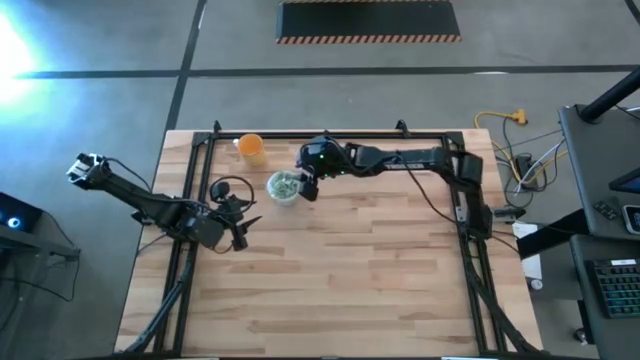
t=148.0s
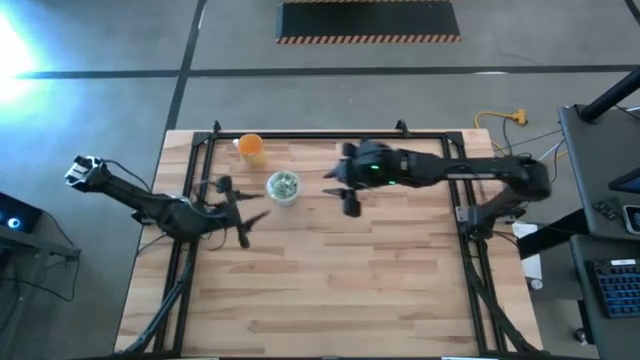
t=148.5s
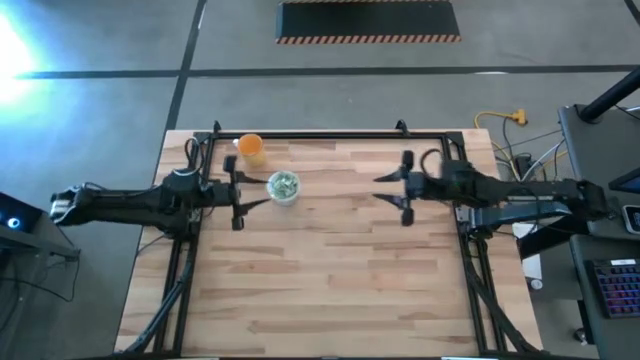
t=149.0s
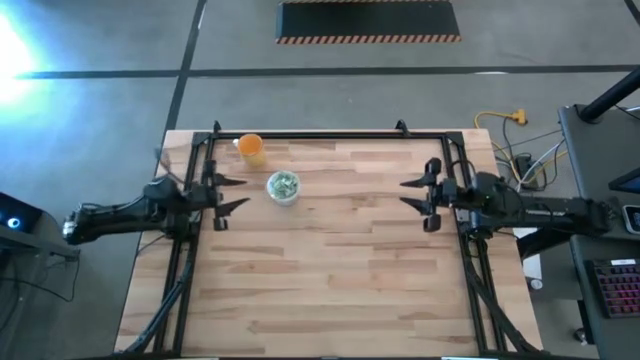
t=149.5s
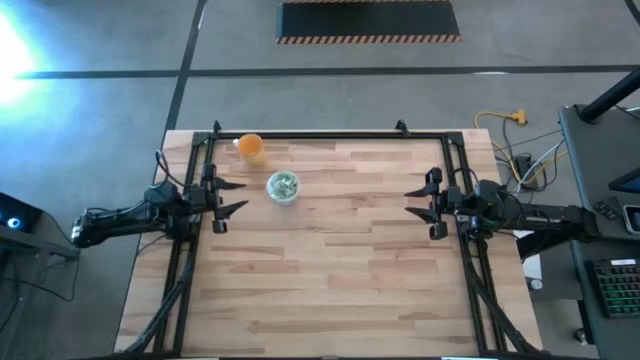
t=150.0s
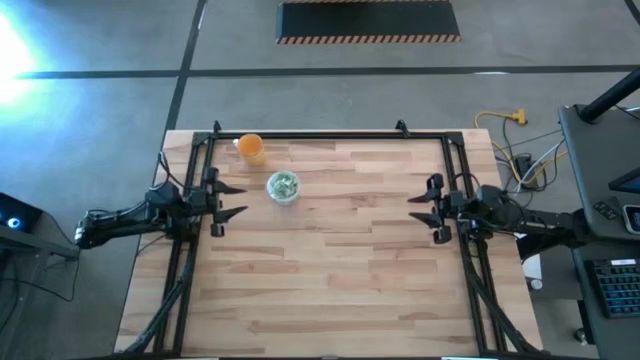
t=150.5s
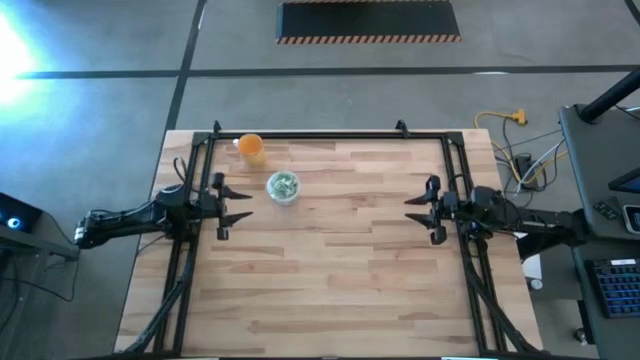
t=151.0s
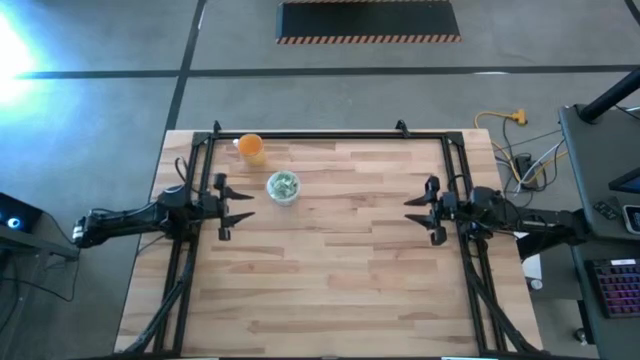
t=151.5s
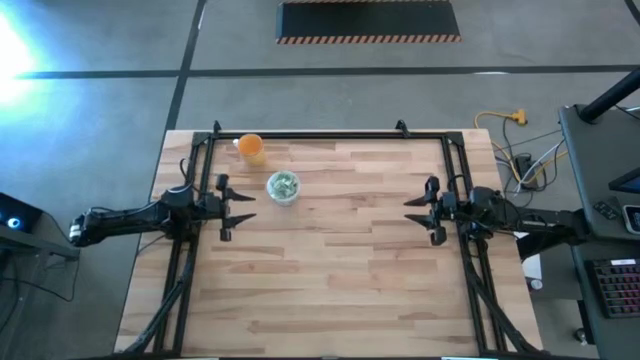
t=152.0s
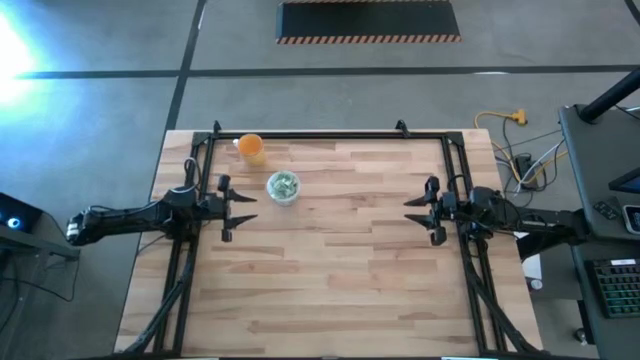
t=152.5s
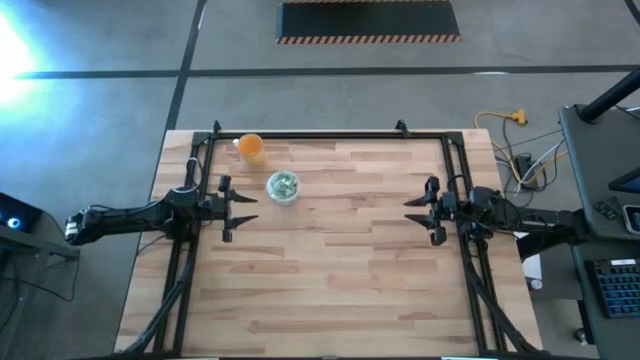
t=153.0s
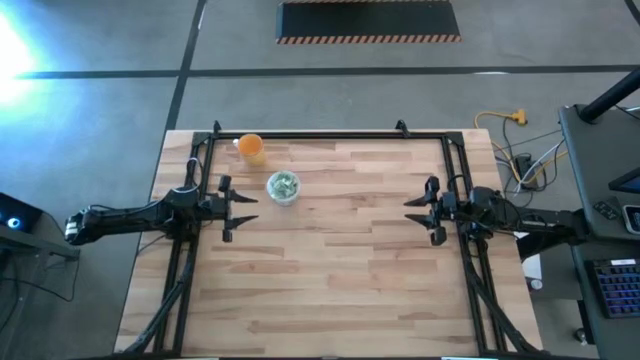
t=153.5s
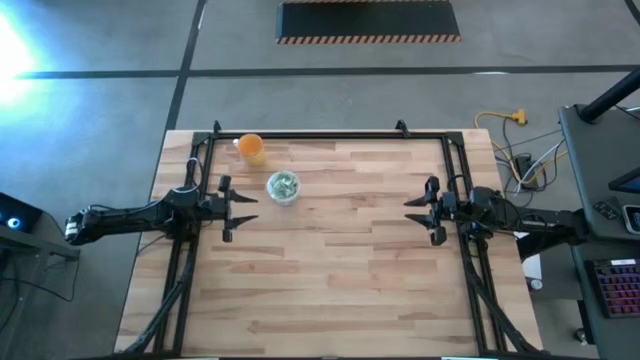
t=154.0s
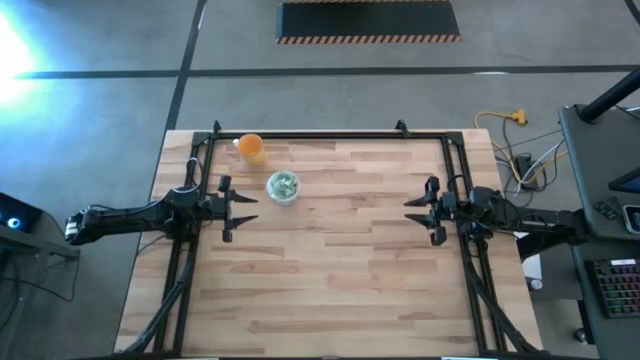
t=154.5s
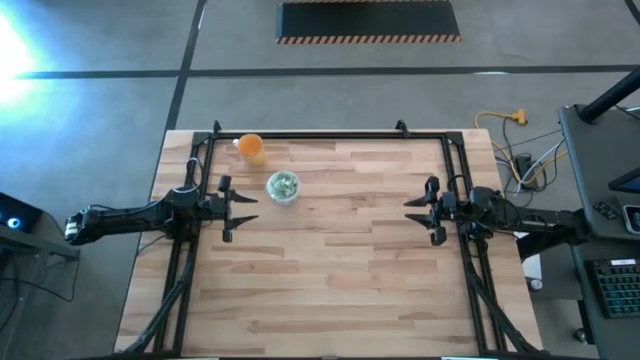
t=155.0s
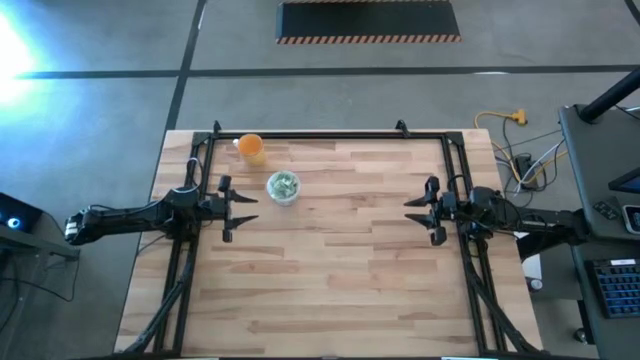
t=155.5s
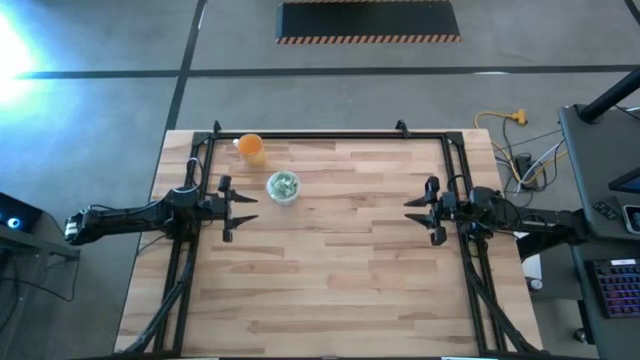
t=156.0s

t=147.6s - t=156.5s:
Task: Pick and place Stevia / Truvia into bins
Return to Home Position

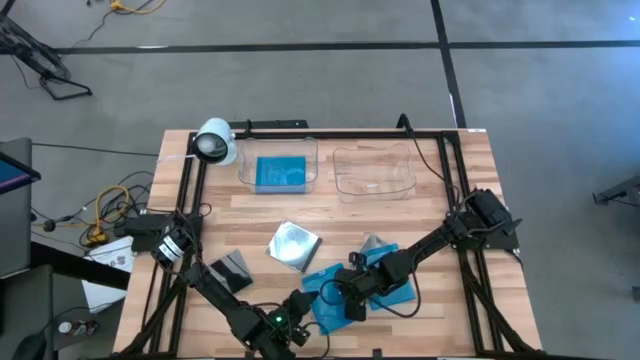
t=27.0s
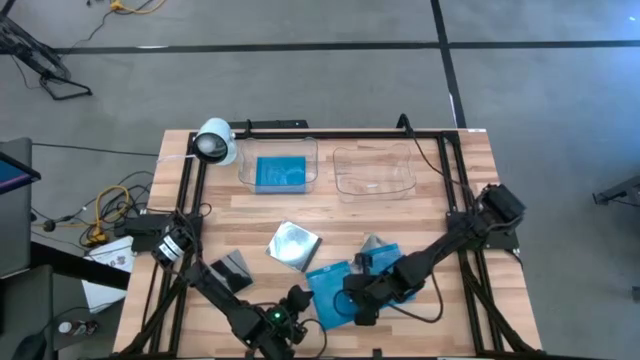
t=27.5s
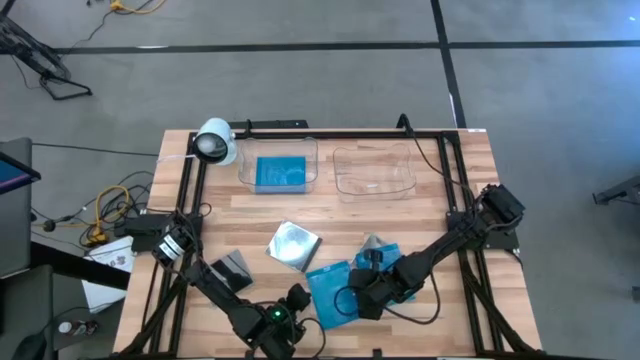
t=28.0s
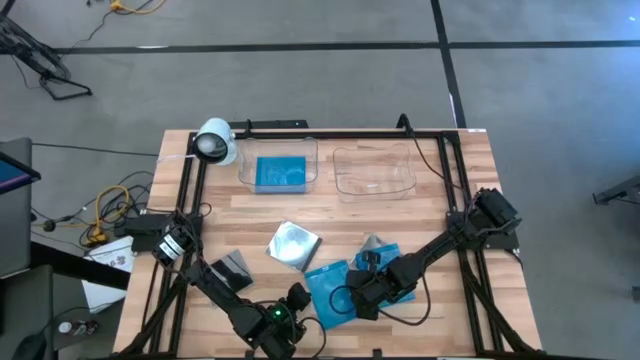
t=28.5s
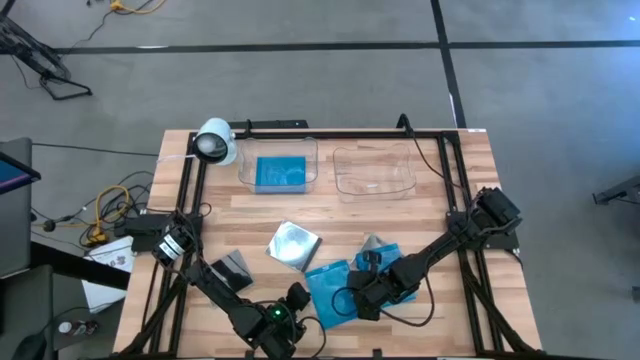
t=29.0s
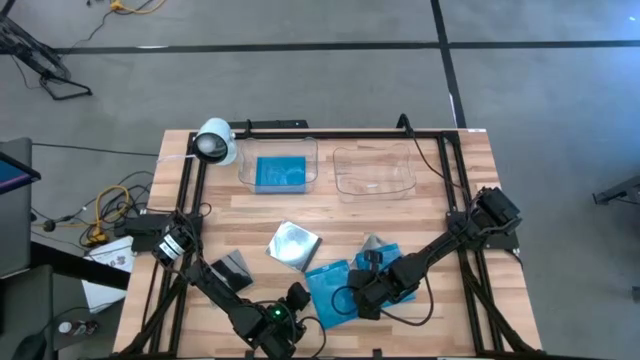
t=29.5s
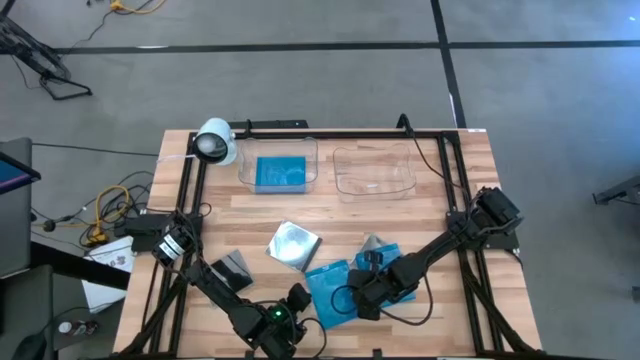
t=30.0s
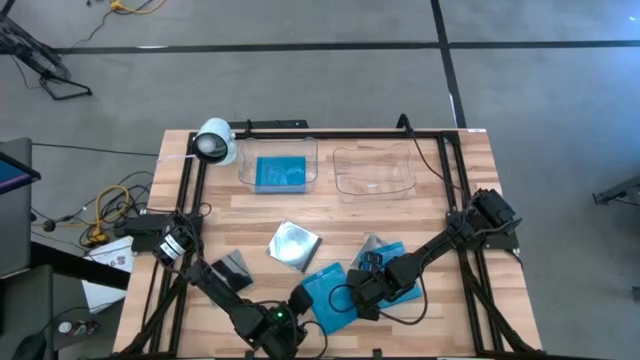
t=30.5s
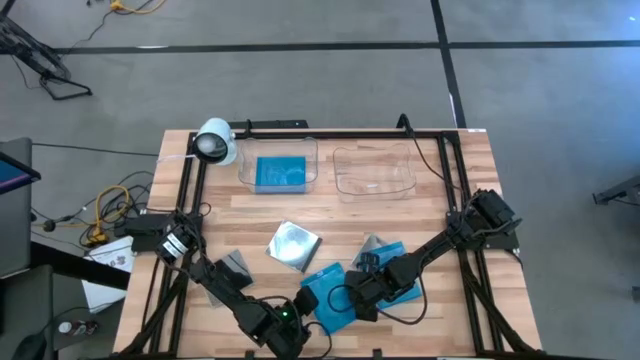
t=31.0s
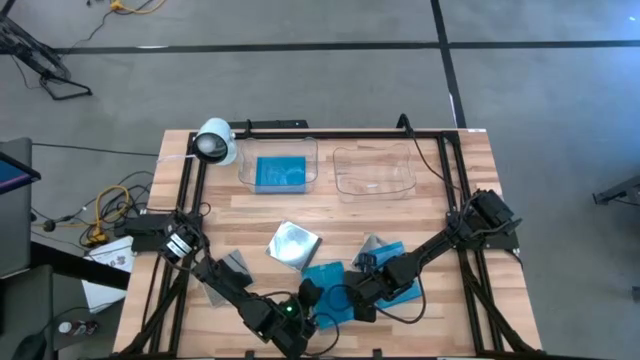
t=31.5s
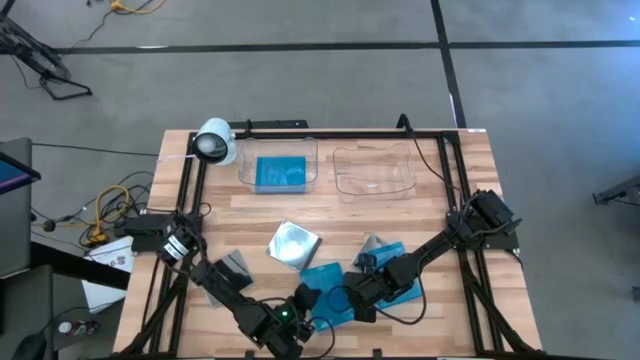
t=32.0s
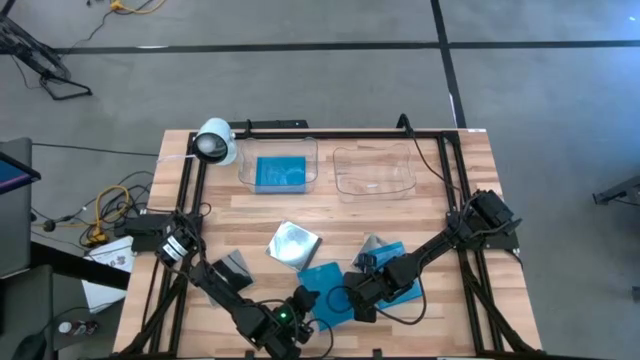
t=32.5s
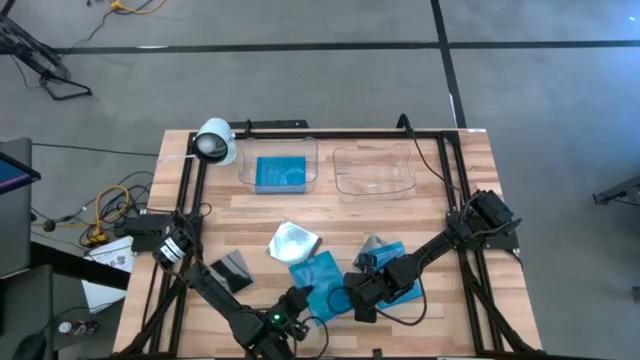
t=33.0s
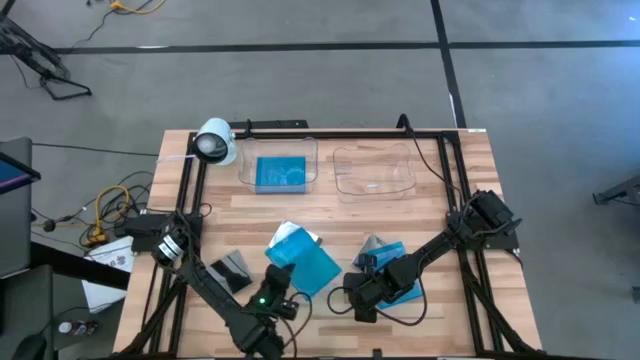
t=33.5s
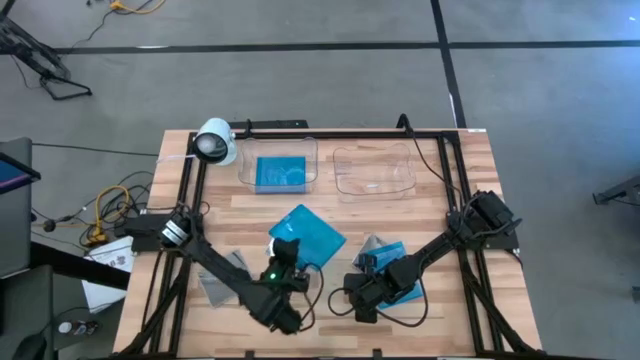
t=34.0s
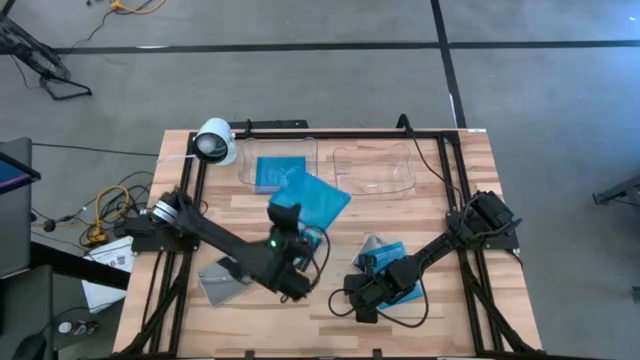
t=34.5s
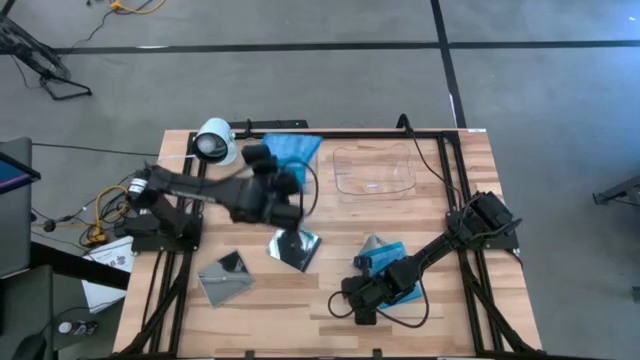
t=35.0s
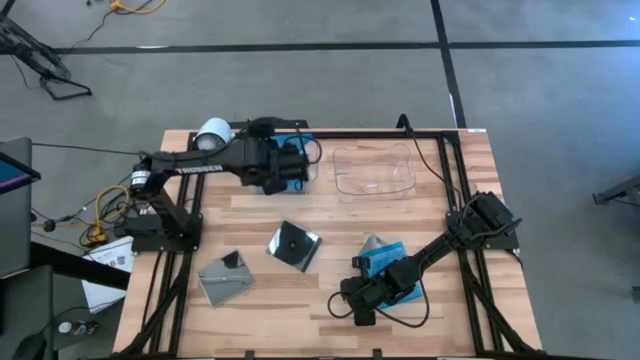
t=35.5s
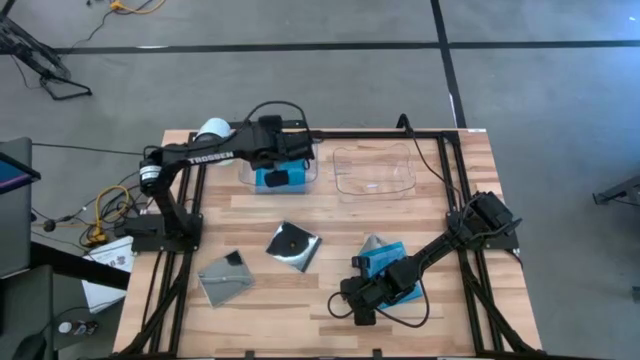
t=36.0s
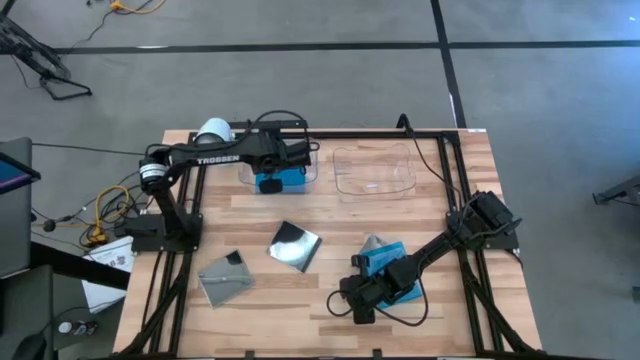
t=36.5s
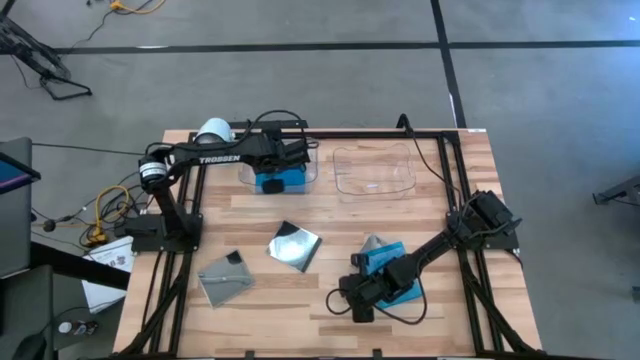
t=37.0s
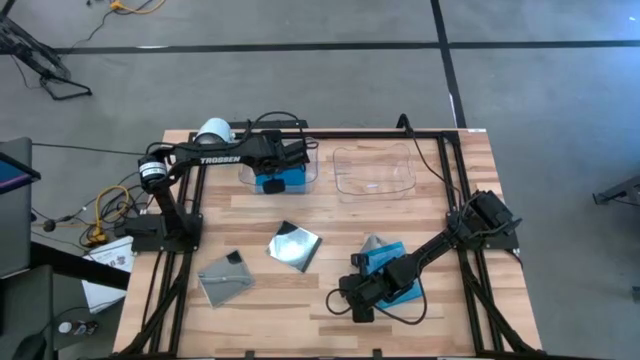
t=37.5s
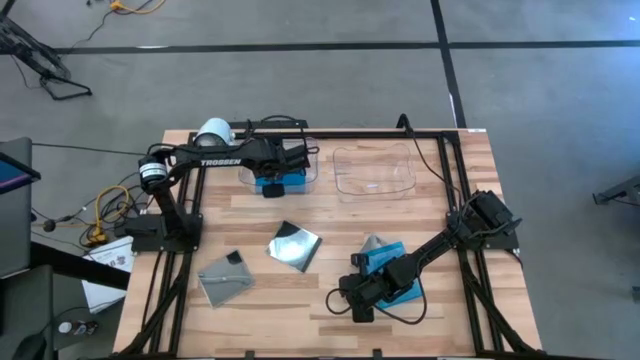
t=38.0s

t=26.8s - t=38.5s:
Task: Pick & place jewel cases by type
Put the left blue cd case into the left transparent bin
